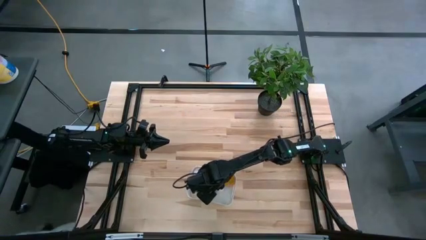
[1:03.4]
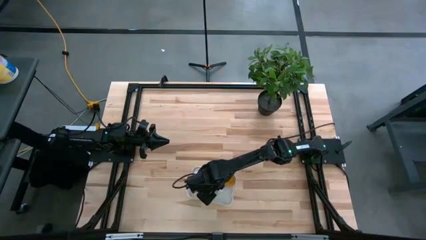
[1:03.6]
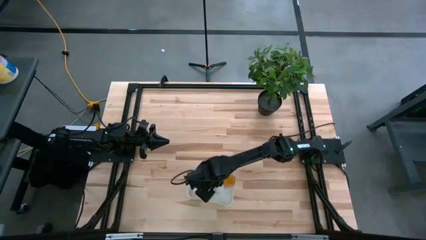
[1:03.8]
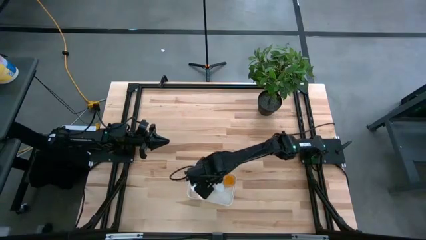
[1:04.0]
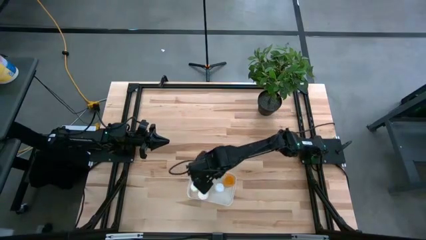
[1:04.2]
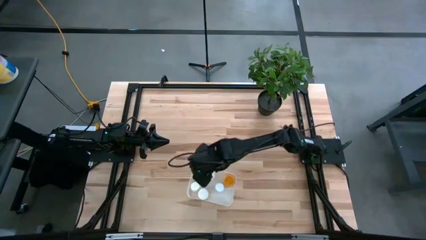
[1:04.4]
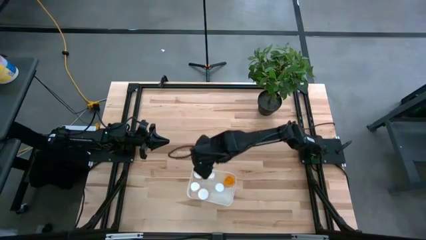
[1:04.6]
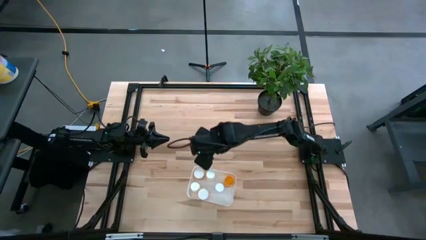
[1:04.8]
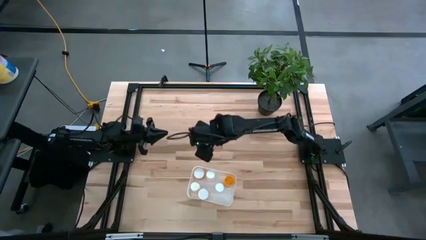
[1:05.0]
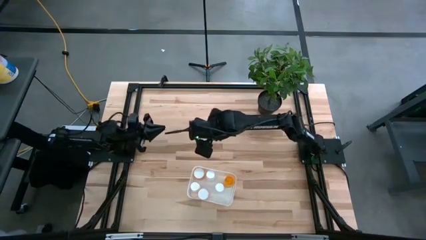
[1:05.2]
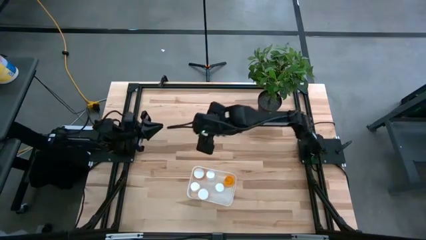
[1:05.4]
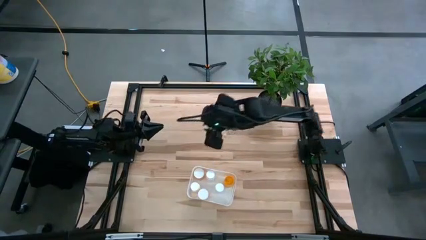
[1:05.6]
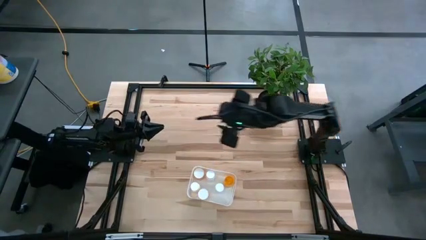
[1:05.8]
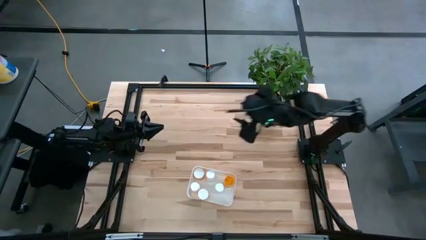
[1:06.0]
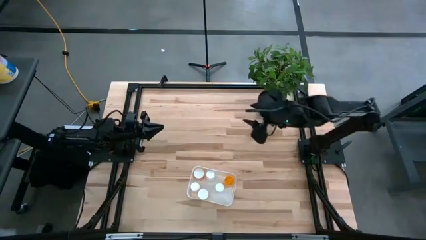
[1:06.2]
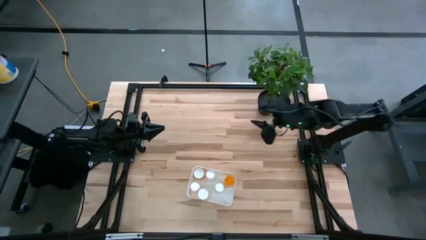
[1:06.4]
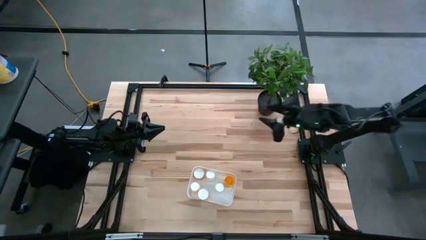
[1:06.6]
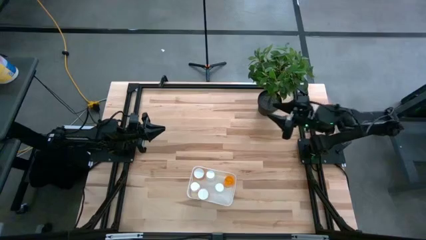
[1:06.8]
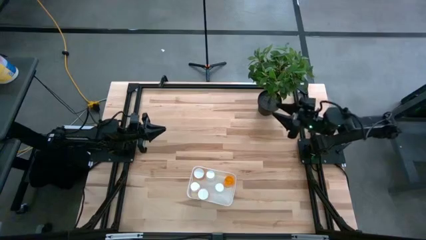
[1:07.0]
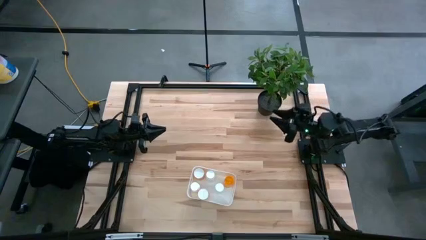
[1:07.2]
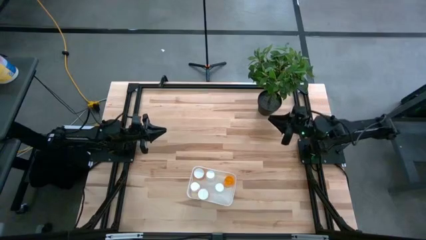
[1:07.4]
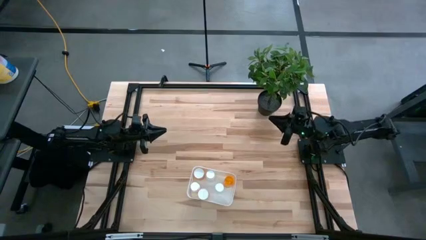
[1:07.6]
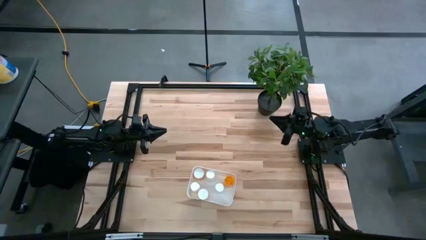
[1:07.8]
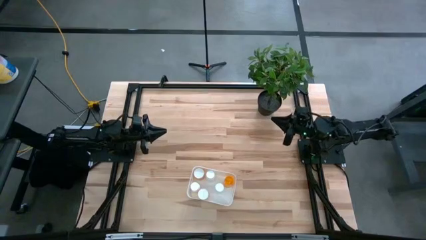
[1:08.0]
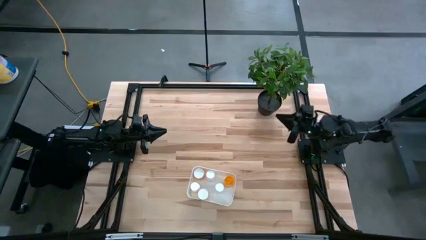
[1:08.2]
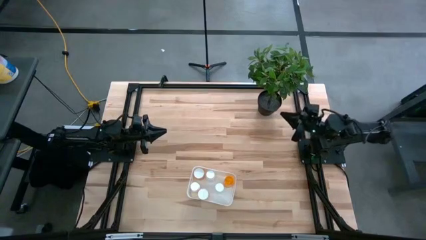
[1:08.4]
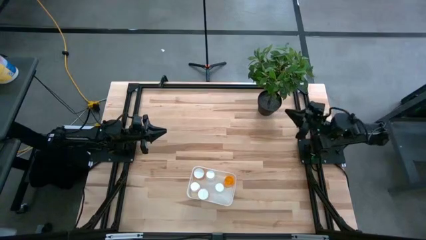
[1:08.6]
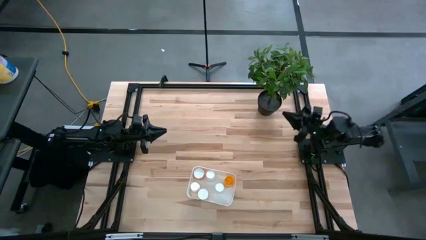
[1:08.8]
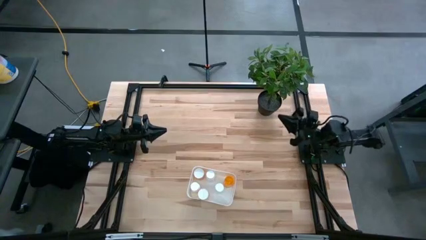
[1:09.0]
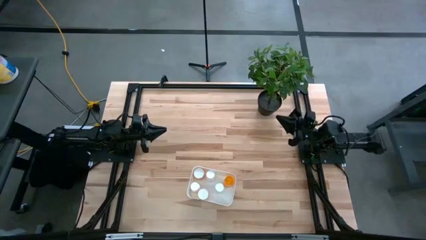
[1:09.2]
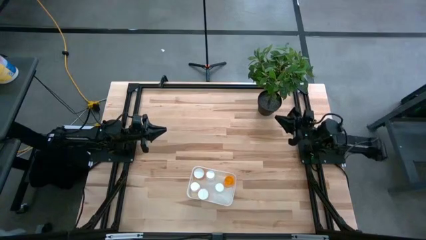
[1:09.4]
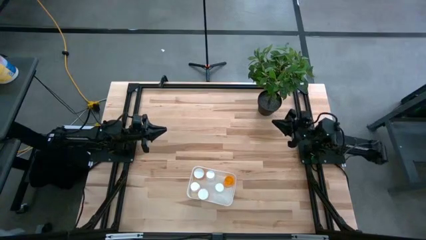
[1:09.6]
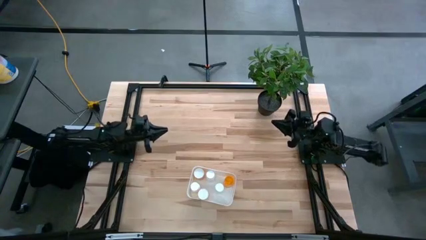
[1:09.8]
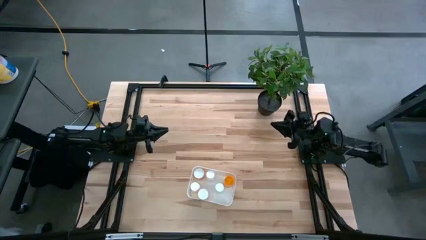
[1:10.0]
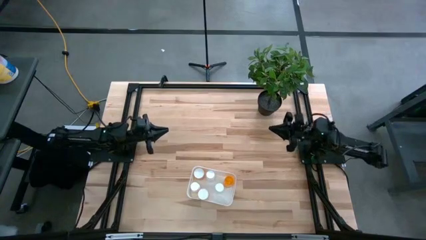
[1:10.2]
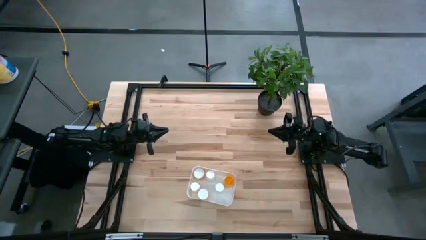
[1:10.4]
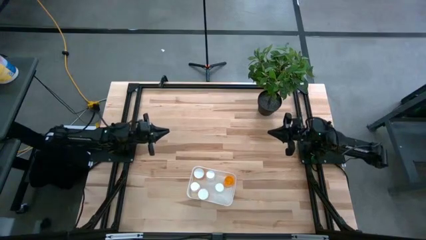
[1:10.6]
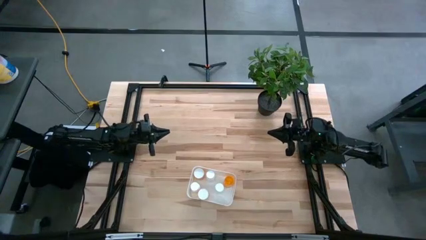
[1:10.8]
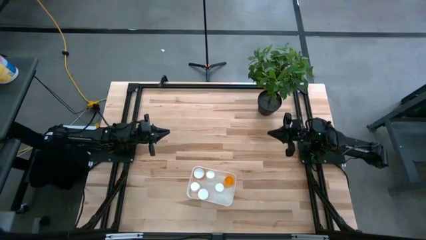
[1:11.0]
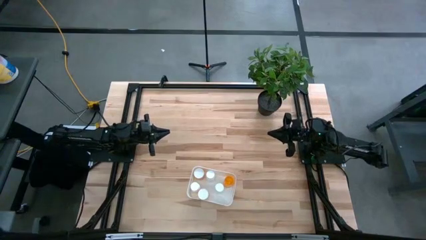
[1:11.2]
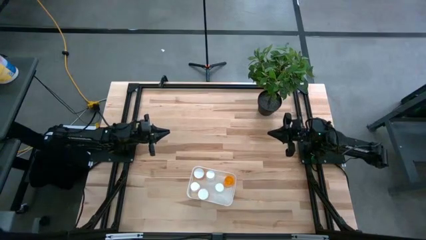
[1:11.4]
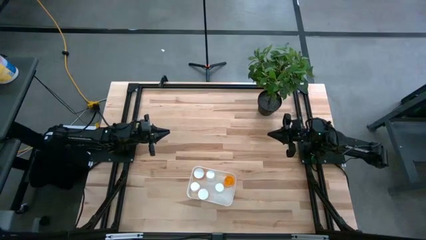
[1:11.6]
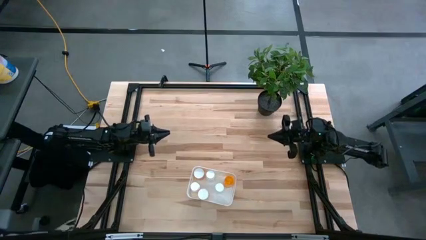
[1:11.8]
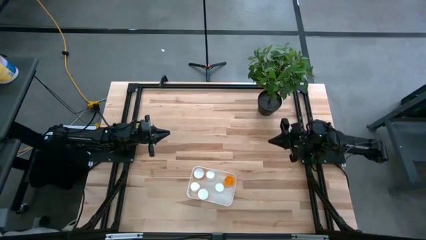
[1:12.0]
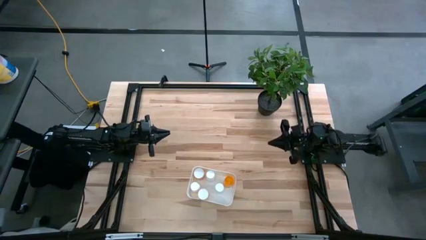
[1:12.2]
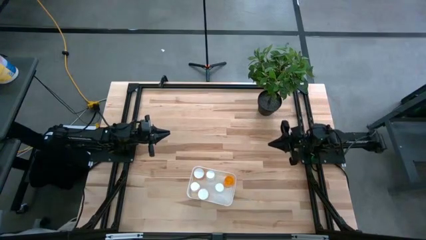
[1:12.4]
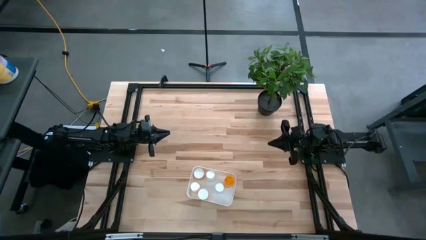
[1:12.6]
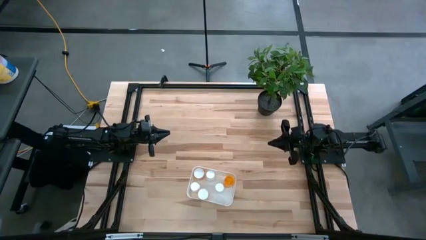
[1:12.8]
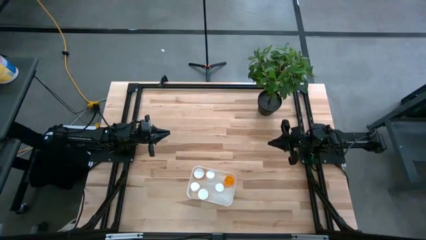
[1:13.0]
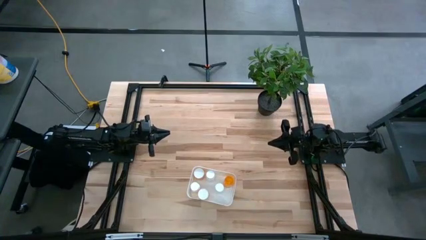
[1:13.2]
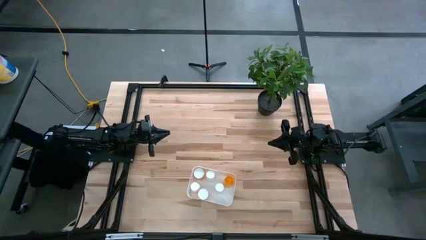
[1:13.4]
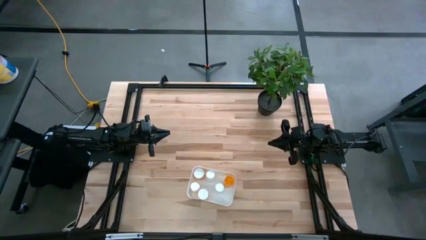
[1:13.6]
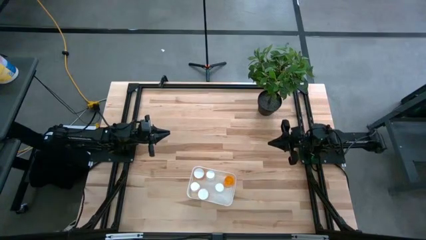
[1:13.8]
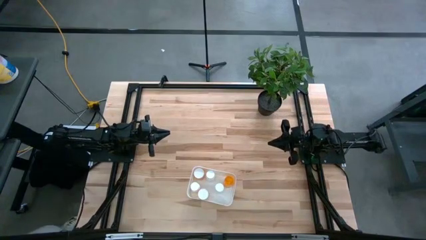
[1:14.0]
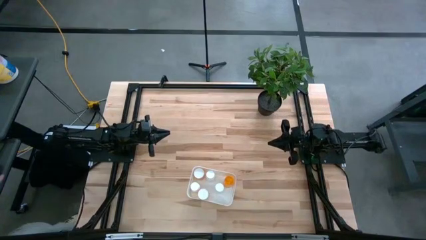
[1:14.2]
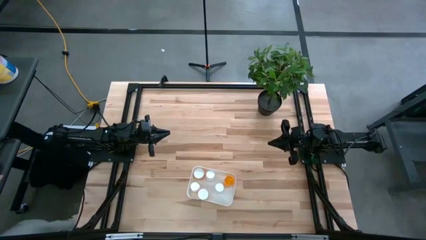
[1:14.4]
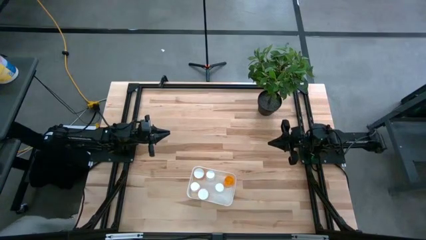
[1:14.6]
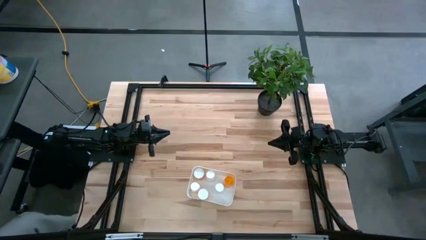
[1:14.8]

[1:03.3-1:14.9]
Task: Pick and place pill bottles into a basket
Return to Home Position
